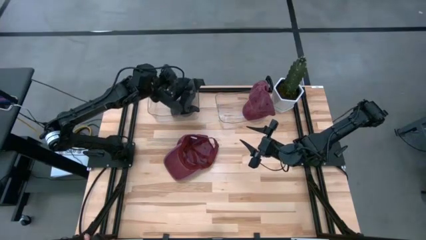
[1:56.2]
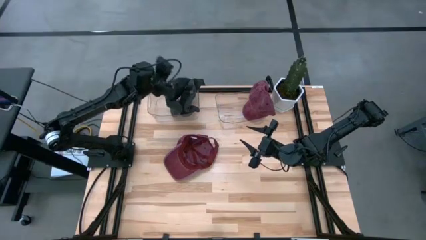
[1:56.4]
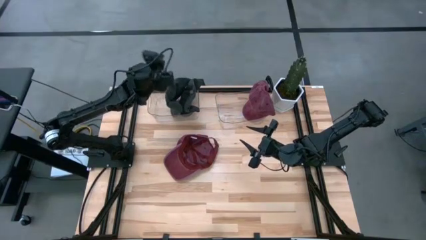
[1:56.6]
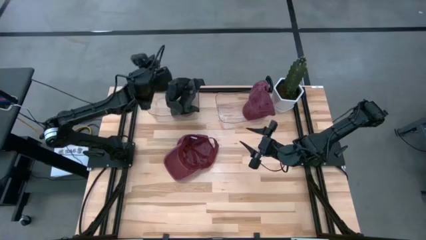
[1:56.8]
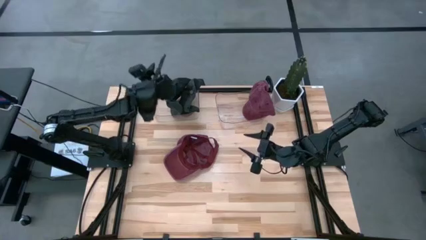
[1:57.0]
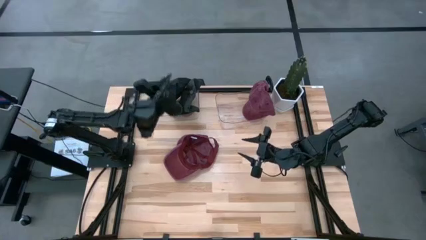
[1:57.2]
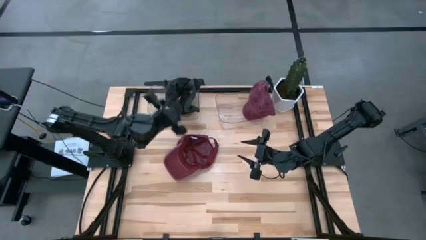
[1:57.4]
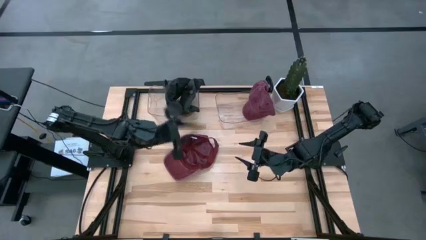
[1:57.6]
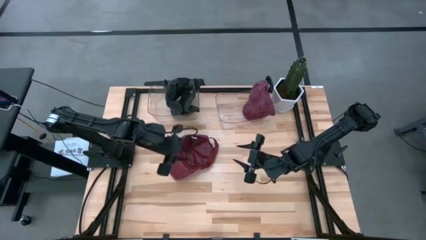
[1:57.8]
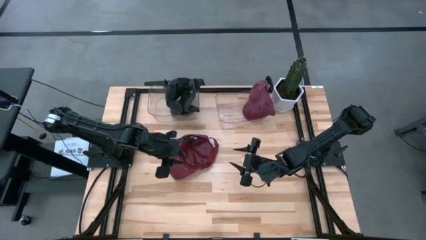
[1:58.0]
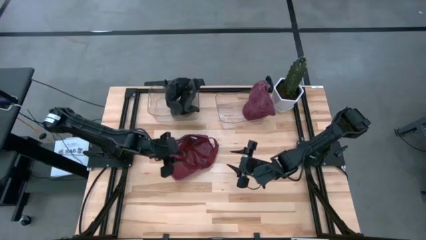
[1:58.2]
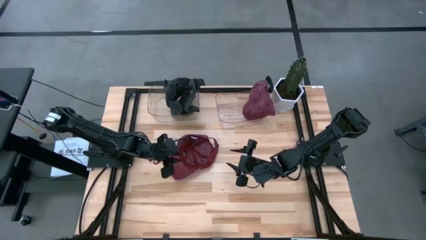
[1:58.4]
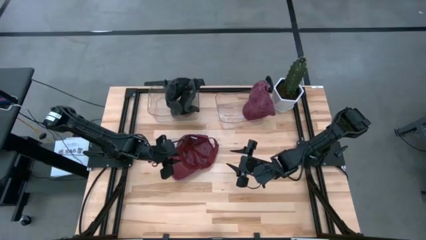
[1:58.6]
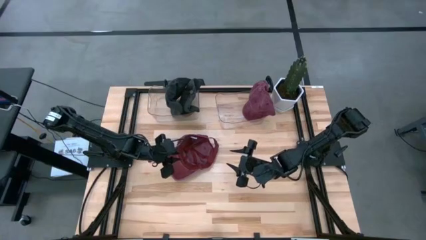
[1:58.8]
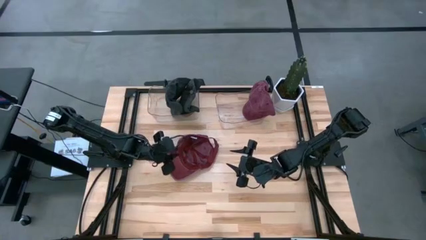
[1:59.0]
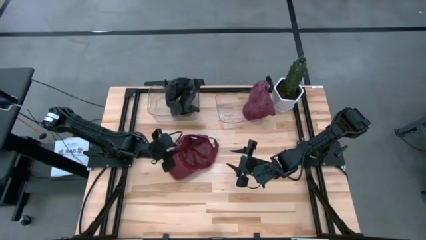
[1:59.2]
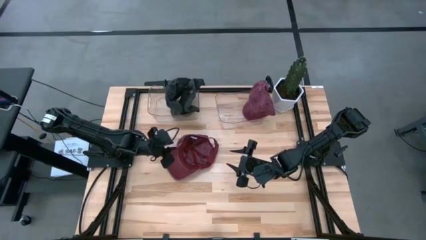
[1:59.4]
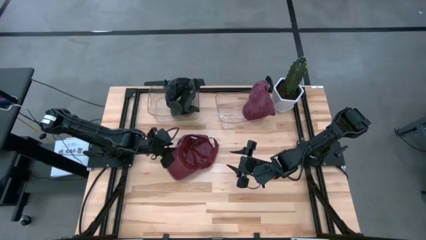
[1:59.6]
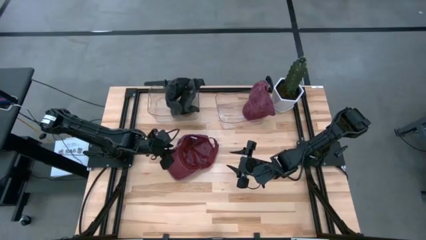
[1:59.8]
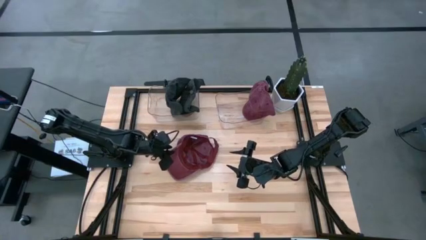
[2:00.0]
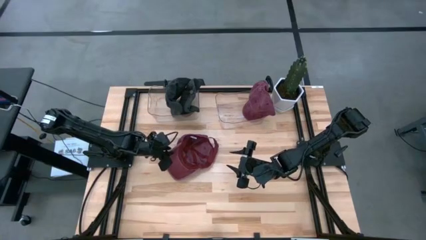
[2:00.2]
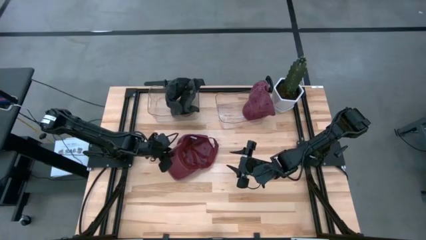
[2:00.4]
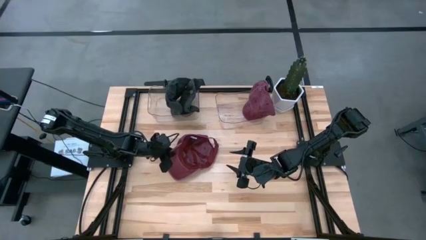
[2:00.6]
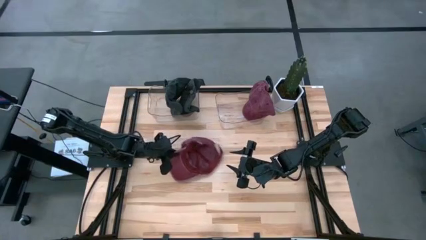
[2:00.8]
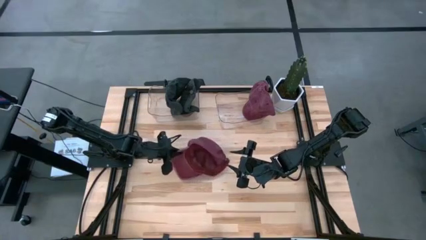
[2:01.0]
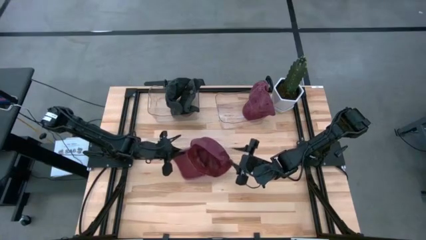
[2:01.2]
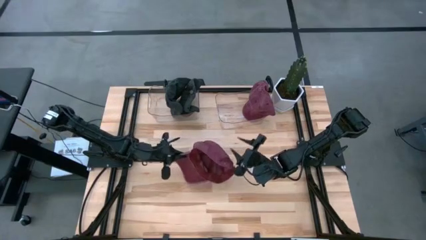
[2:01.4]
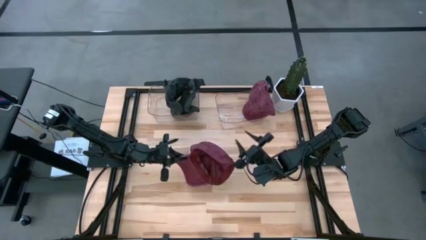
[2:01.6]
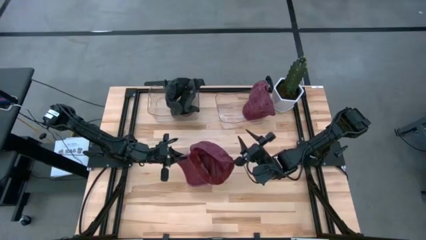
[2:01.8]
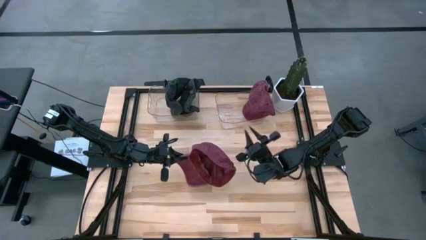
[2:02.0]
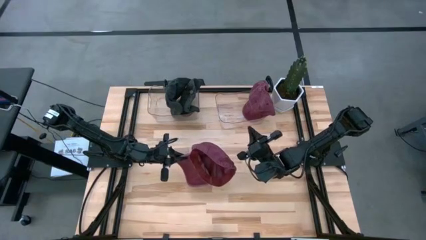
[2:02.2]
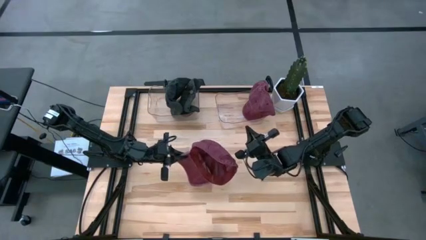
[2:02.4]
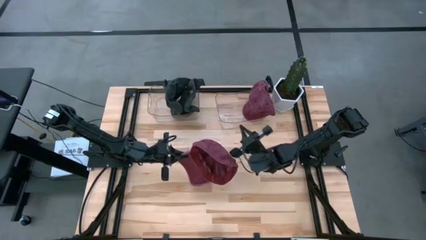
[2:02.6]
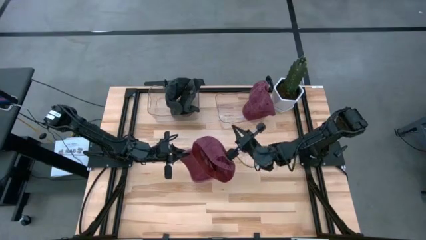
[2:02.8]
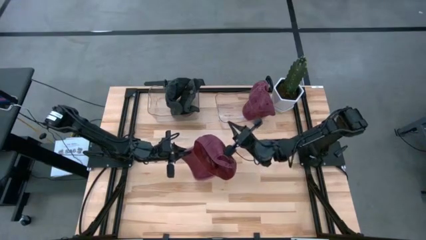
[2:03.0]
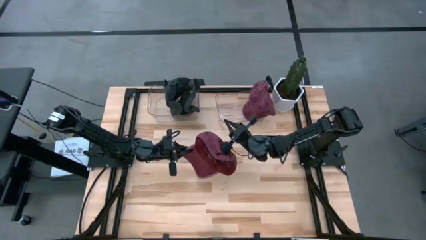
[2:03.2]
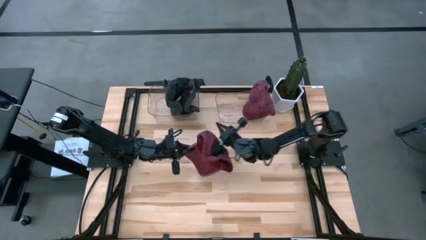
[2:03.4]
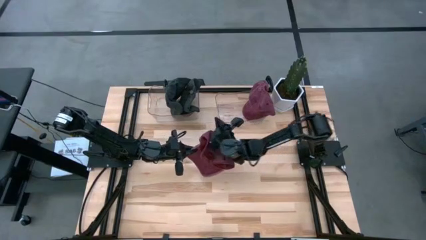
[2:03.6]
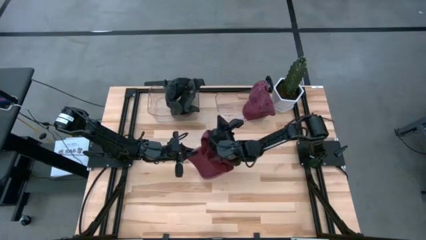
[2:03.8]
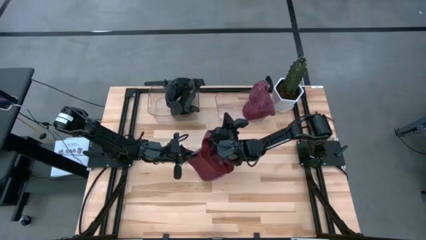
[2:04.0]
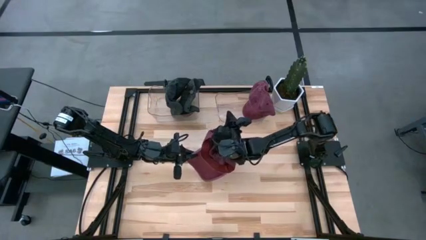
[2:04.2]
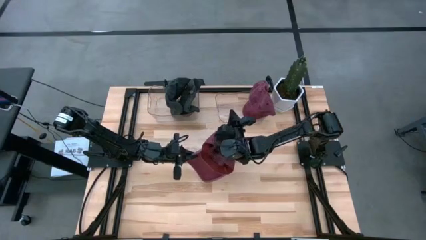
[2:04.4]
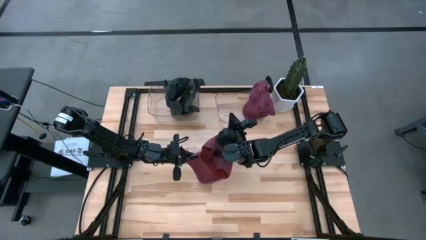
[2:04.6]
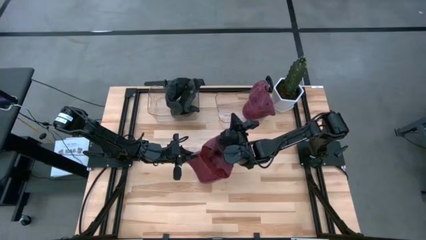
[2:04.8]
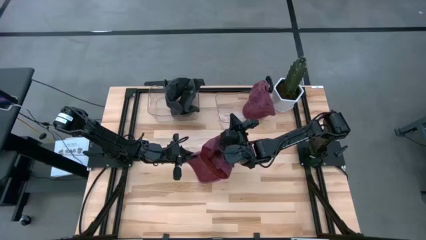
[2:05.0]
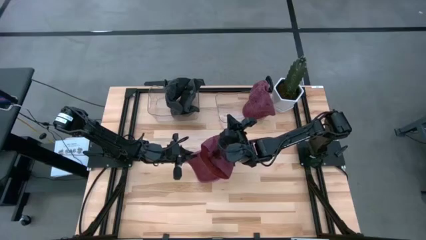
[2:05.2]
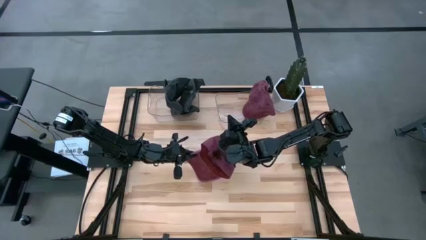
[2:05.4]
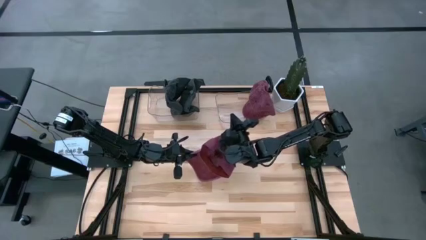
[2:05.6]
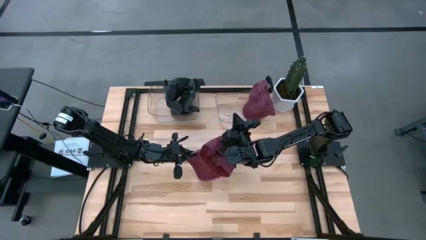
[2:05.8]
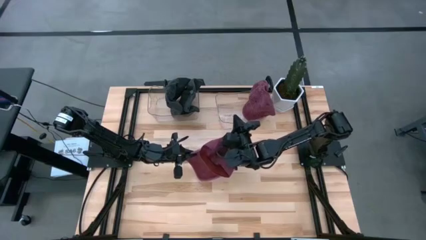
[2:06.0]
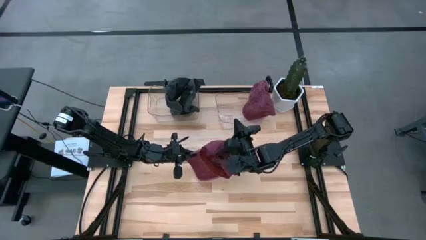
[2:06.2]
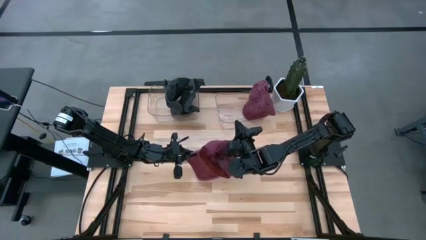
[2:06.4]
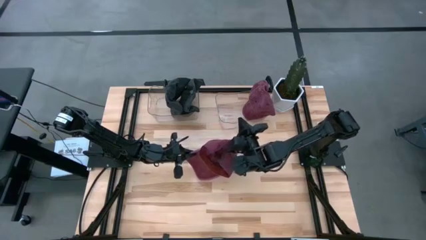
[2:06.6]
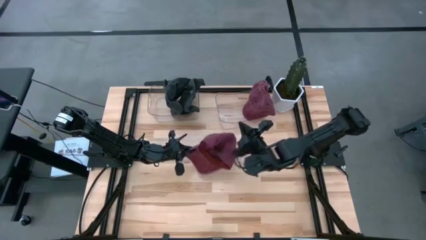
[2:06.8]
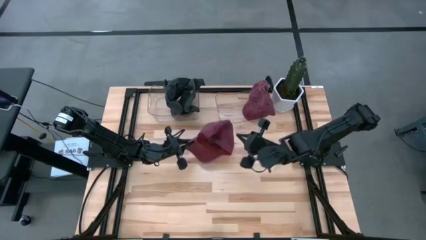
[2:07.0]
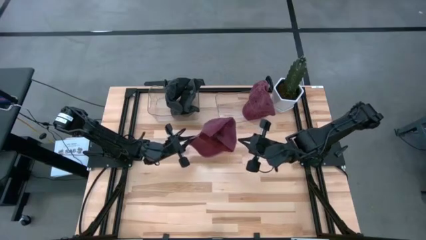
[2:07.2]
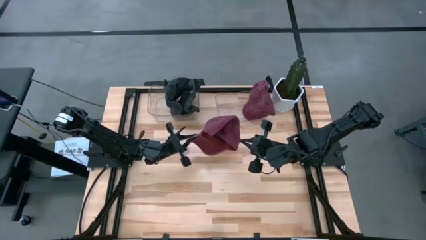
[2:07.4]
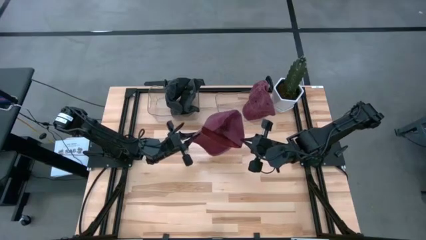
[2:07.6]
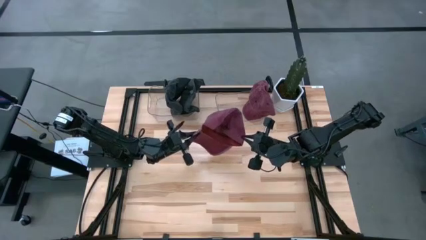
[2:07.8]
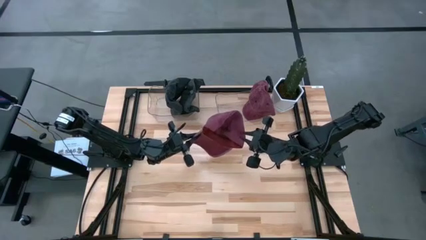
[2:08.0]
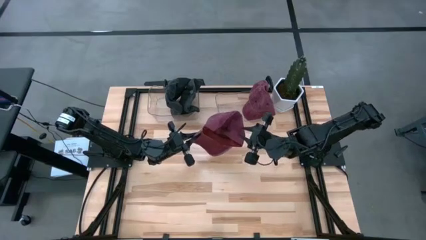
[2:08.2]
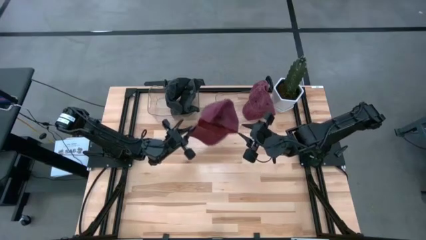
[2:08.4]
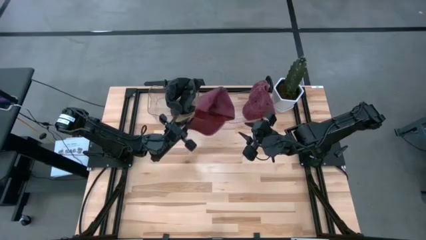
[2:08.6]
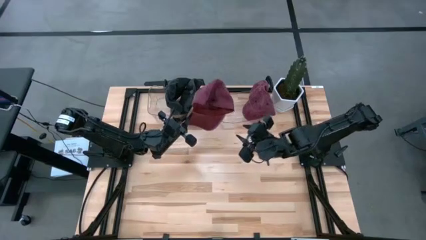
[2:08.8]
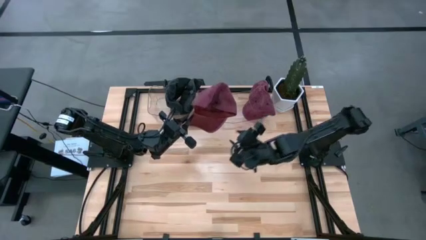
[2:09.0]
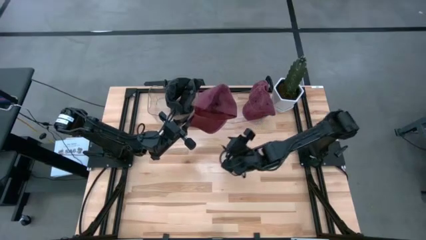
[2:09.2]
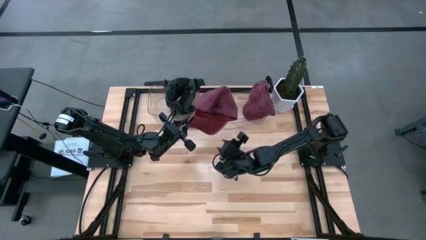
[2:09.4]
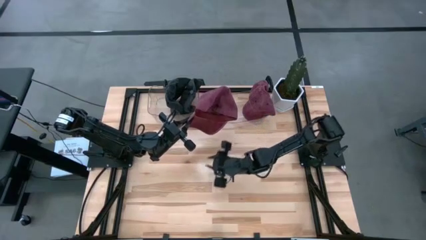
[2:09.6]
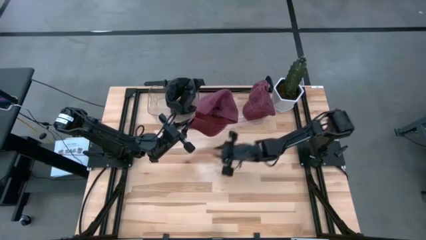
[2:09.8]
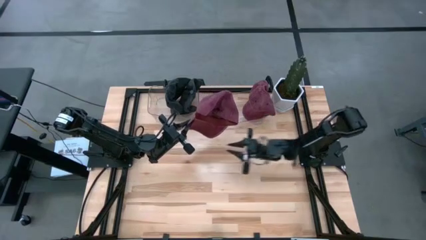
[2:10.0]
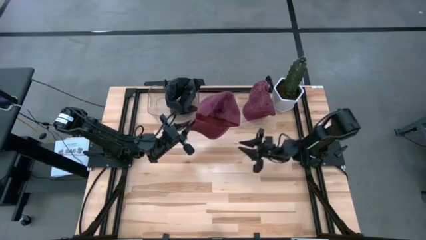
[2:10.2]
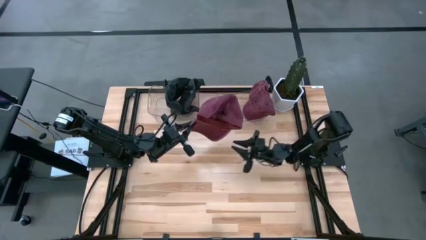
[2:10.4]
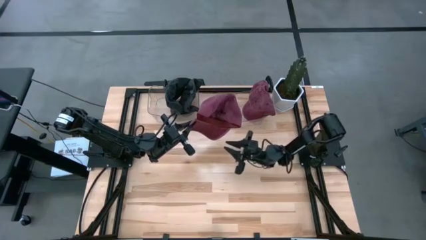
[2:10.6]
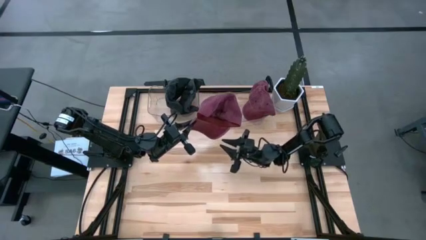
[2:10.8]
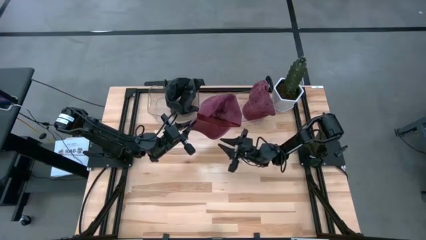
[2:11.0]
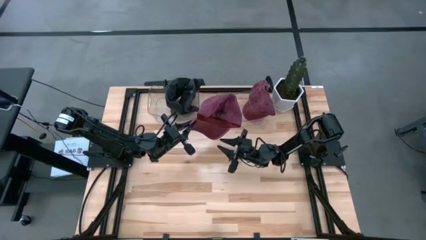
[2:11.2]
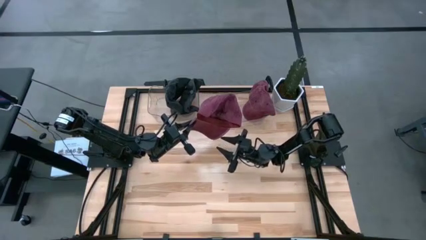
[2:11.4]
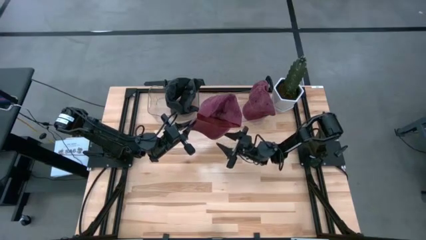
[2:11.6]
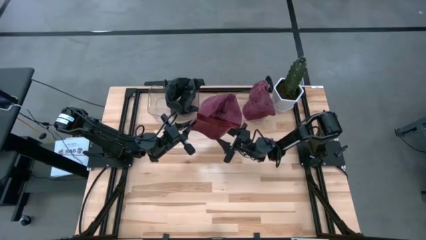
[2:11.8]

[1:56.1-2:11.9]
Task: Pick & Place hat
Put the red cap into the right transparent bin

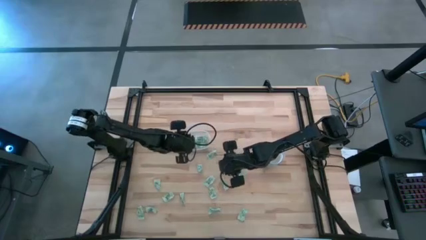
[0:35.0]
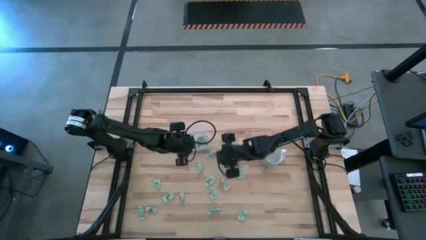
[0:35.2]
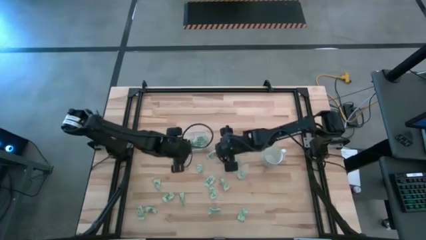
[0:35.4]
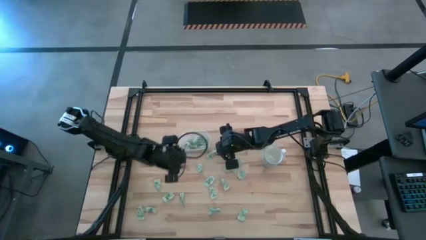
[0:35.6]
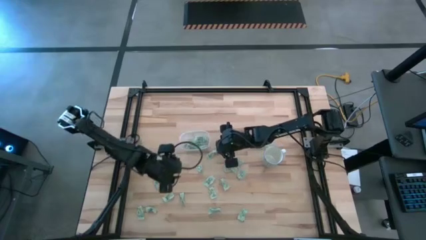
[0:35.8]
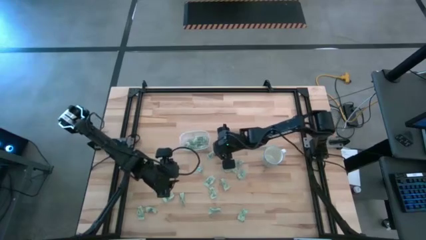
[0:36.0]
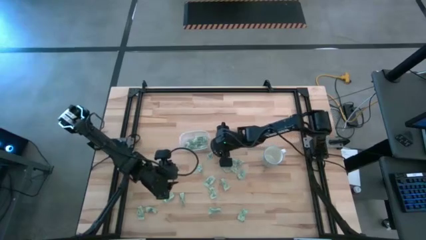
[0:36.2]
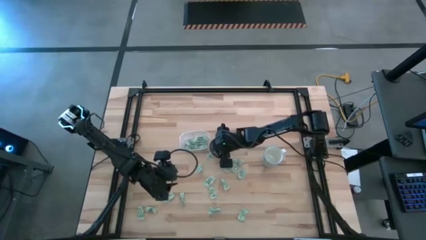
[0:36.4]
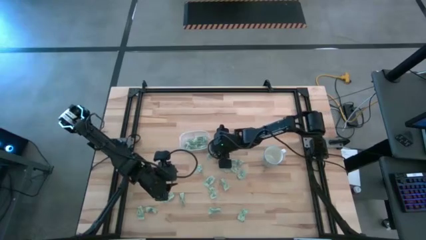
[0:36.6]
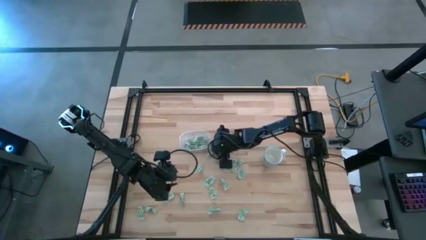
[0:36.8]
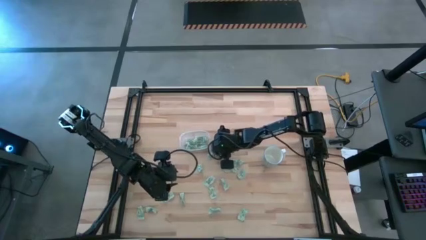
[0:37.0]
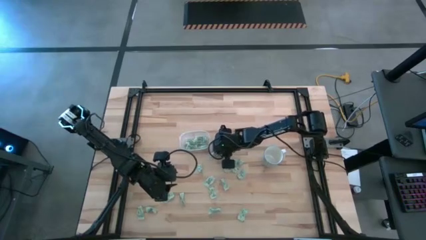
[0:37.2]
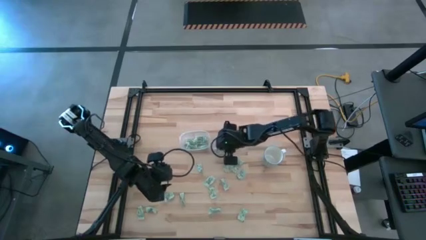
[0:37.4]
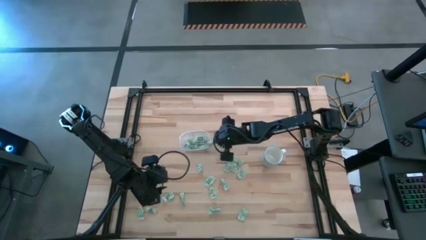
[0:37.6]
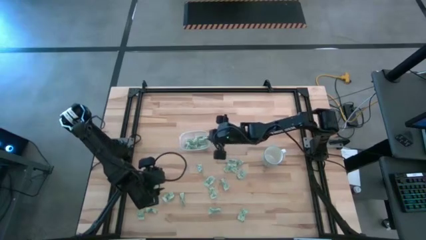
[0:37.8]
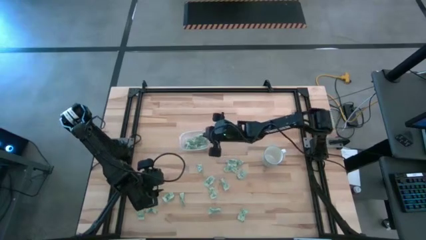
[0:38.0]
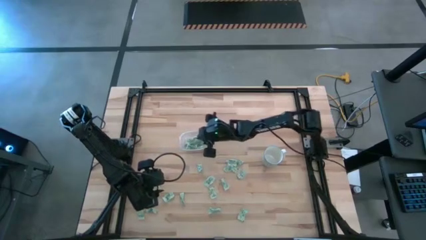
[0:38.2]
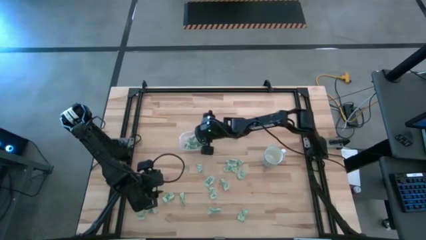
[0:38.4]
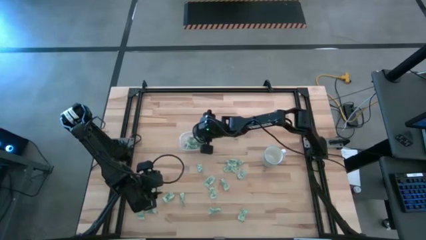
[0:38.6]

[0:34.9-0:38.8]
Task: Pick and place Stevia / Truvia into bins
Put the stevia packet into the transparent bin
